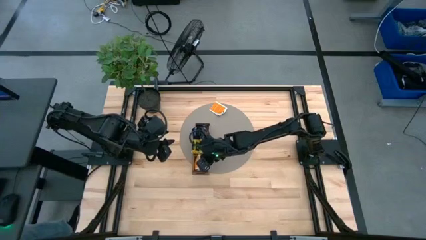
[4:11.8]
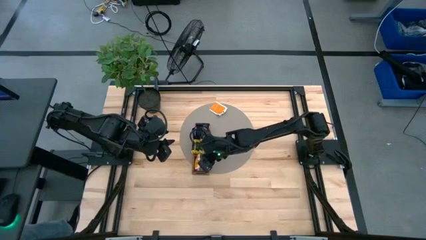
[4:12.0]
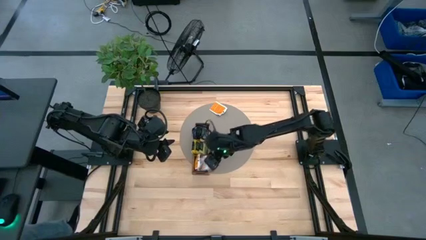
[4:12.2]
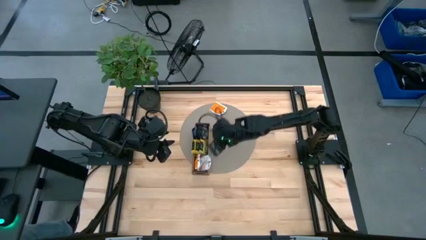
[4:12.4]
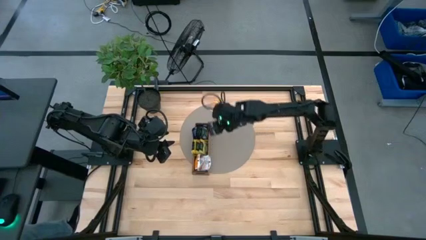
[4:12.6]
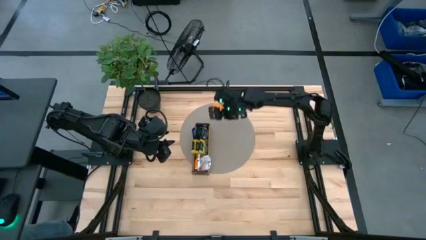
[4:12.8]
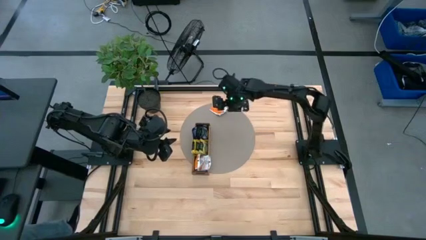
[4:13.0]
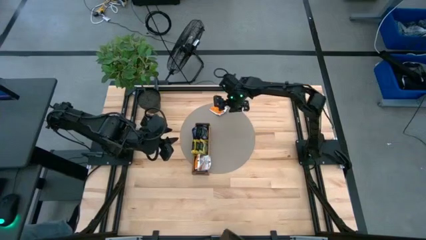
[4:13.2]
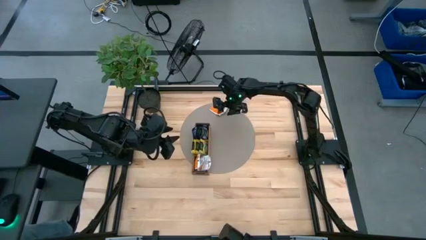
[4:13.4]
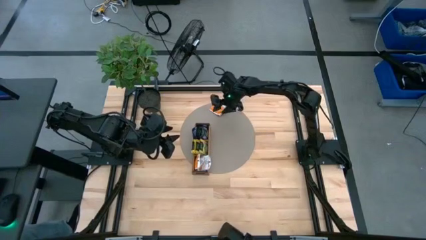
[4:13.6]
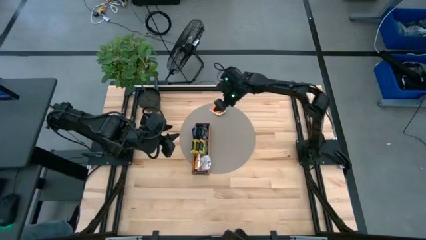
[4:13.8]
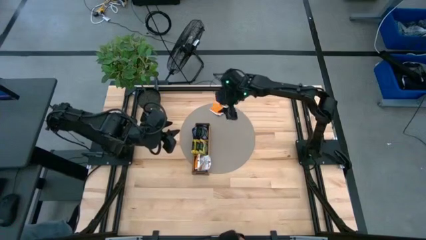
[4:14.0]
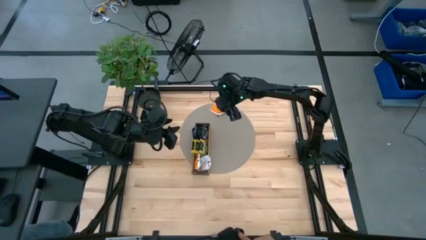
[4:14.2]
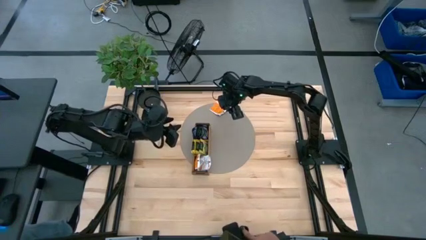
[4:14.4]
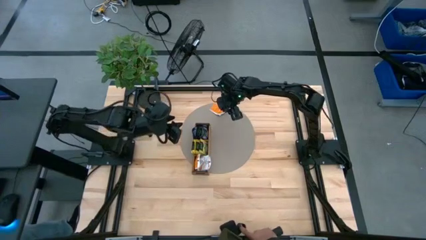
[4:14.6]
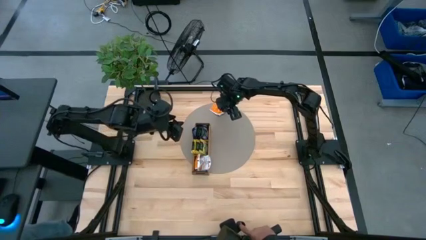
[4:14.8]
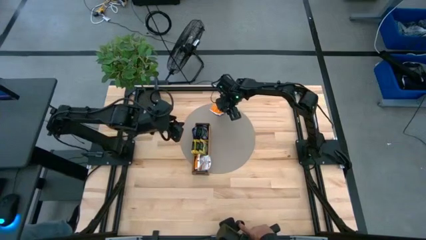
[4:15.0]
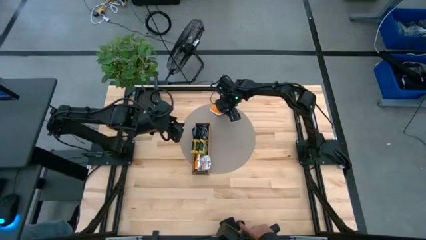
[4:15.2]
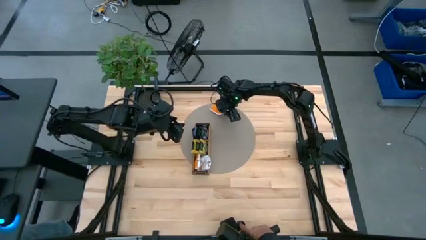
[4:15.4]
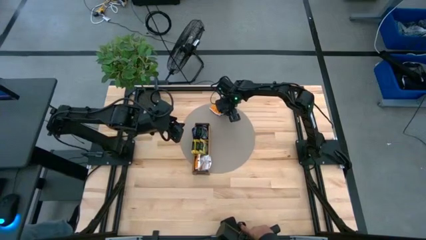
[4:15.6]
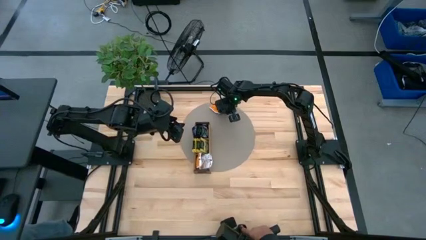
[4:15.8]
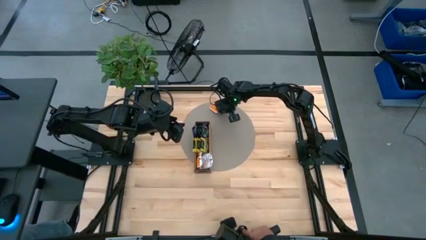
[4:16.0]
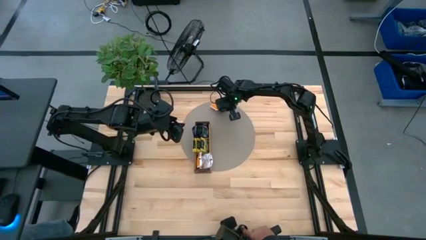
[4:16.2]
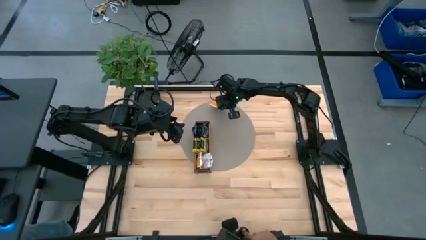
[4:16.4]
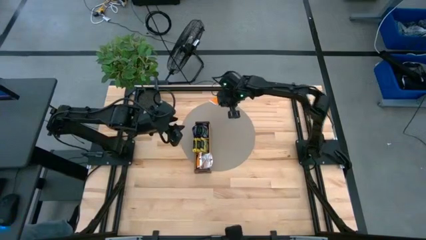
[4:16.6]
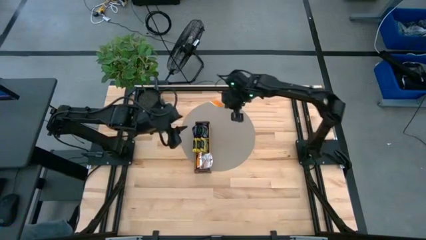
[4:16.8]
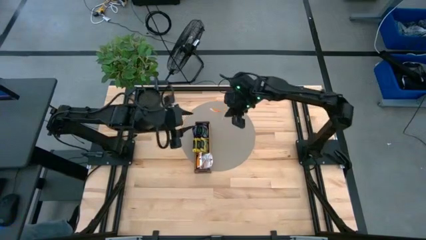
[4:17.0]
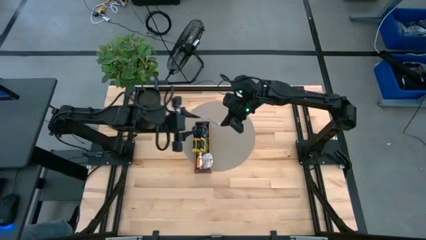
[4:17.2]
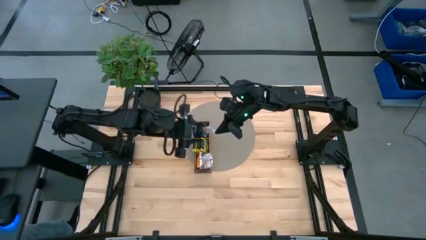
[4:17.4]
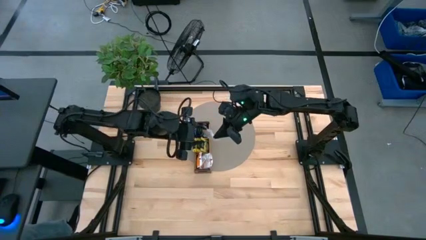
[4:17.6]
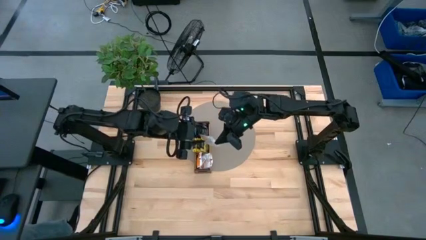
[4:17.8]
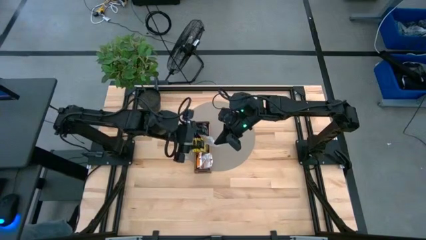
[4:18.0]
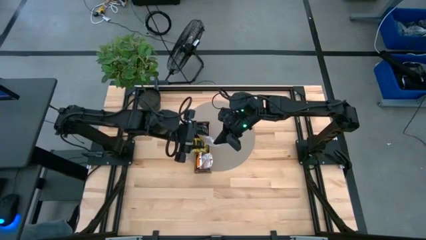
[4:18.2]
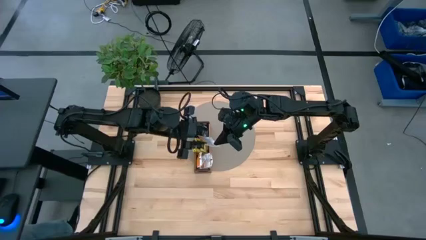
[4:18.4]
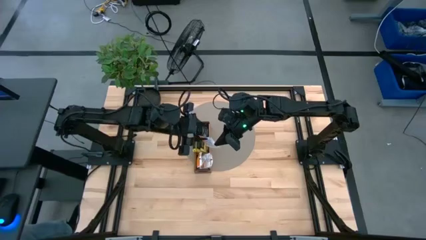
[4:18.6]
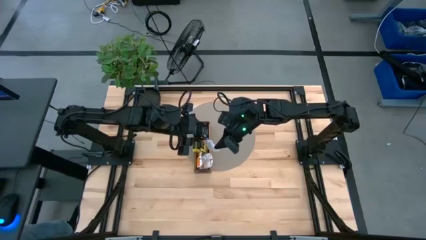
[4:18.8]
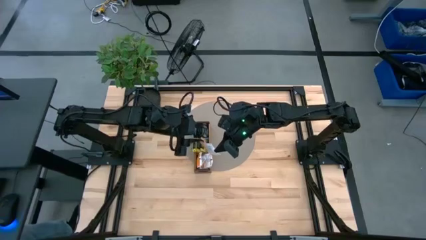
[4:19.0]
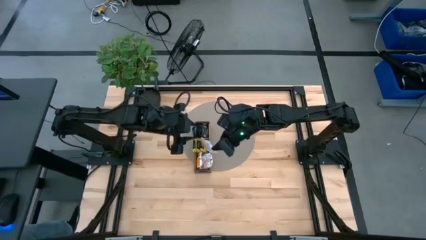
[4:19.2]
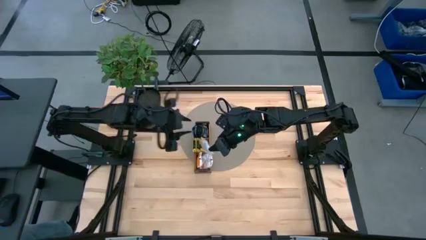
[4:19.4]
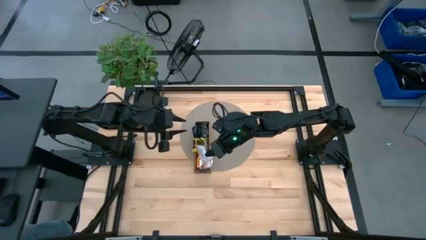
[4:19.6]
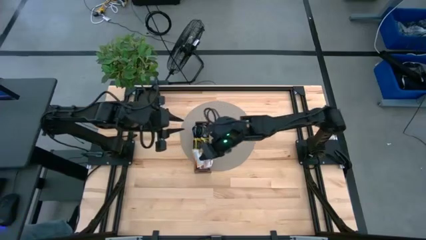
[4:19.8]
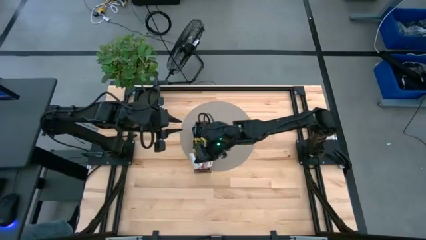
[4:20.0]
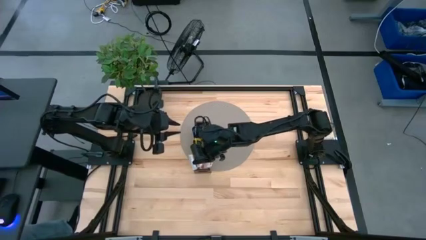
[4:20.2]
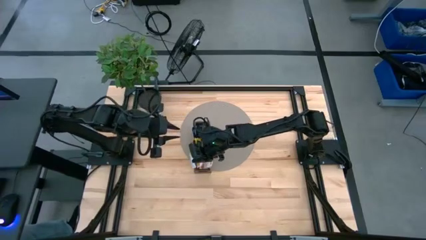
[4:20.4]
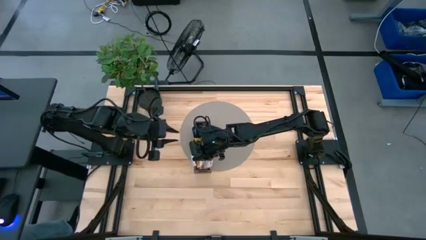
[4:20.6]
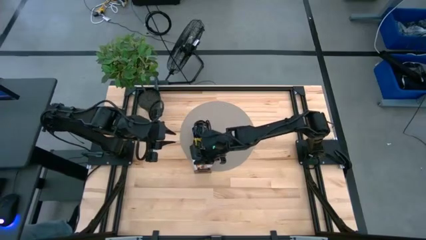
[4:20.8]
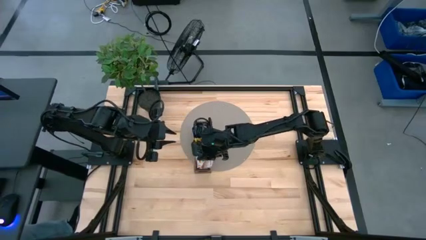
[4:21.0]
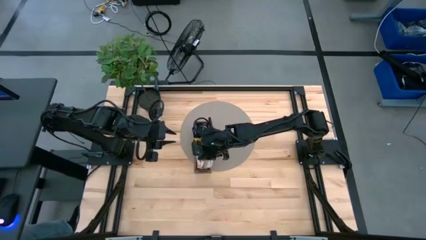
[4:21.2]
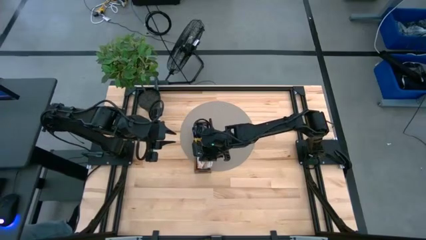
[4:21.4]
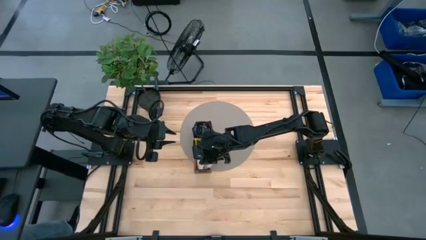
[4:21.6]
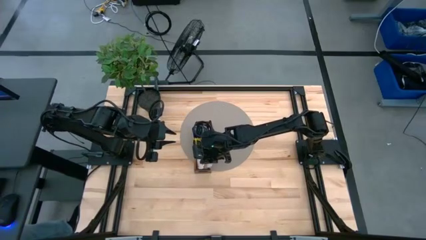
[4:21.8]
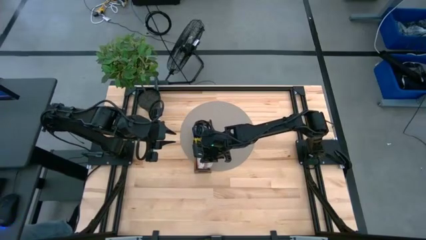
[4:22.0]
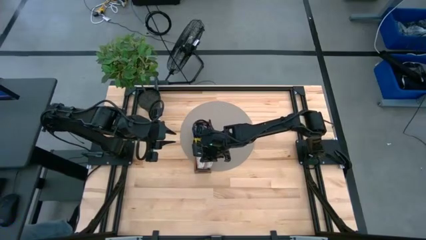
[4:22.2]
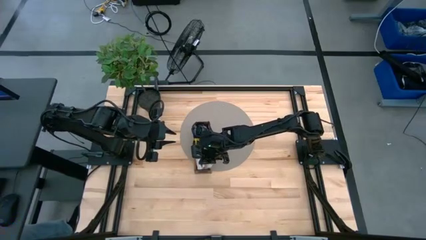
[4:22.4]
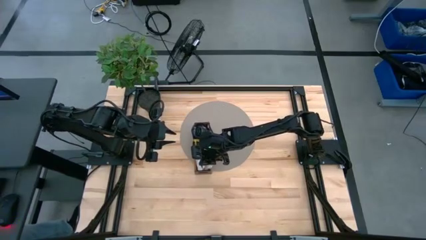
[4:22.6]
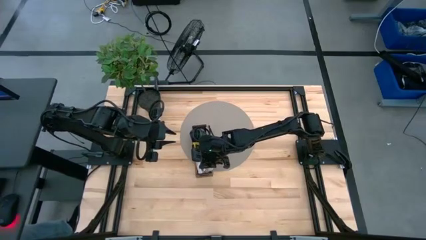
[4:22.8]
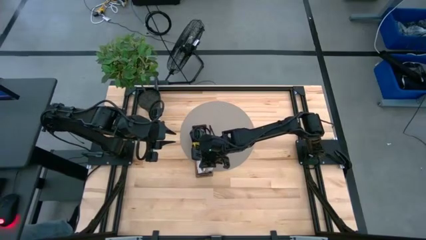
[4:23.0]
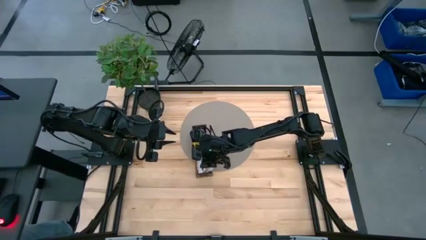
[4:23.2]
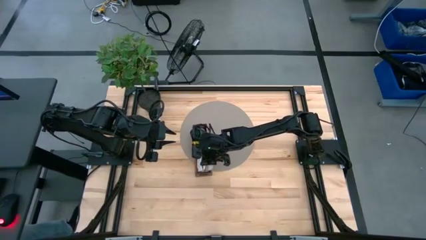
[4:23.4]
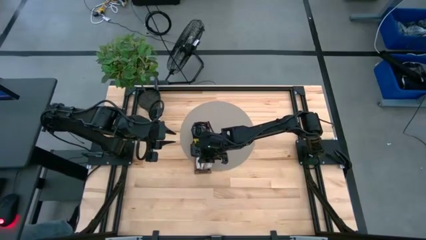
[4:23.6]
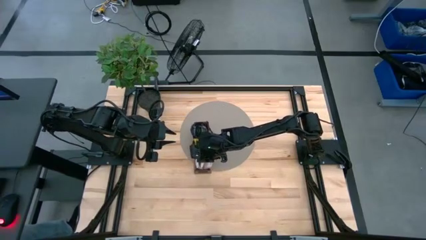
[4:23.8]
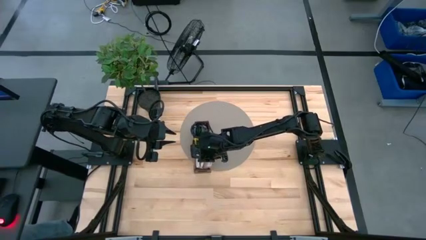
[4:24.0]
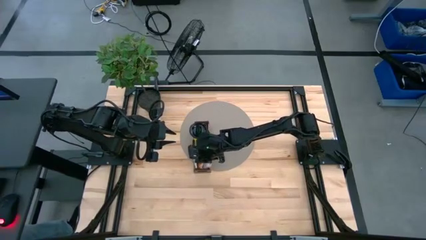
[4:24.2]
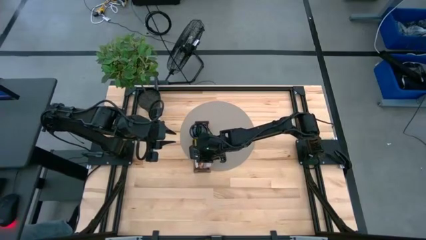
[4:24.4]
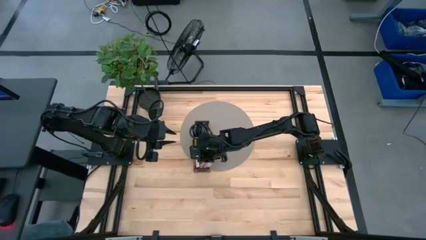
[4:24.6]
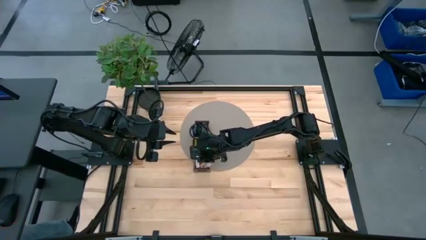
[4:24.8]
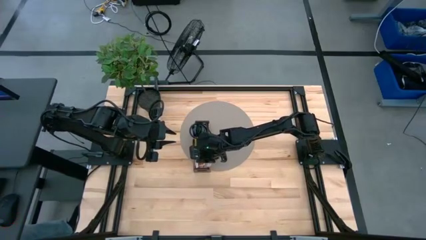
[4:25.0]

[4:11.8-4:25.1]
Task: Pick & Place Tea
Put the white tea bag into the bottom section of the wooden organizer
